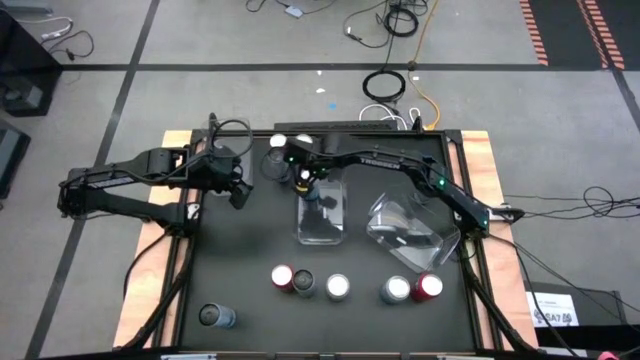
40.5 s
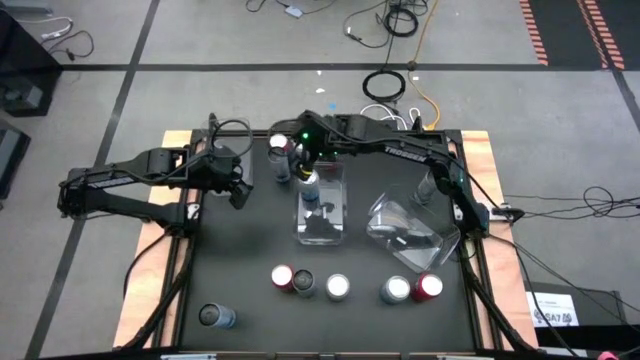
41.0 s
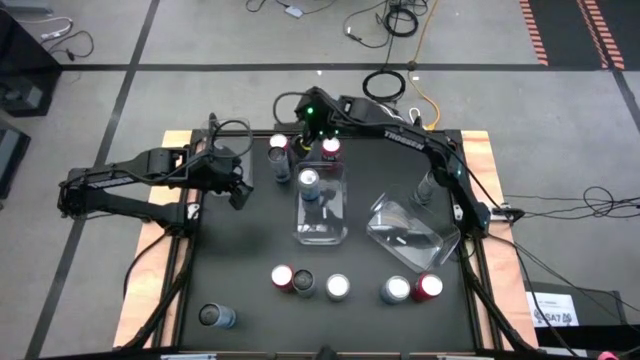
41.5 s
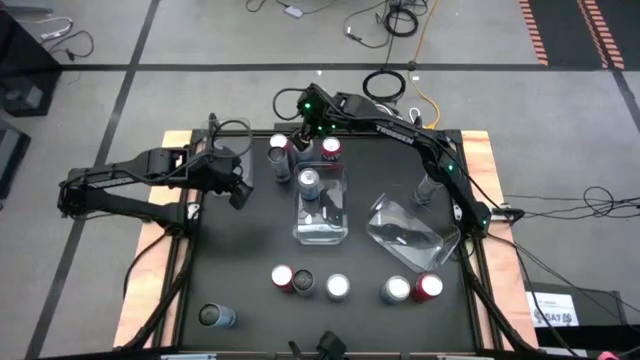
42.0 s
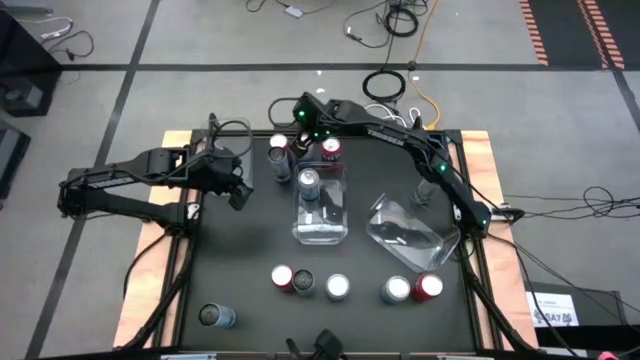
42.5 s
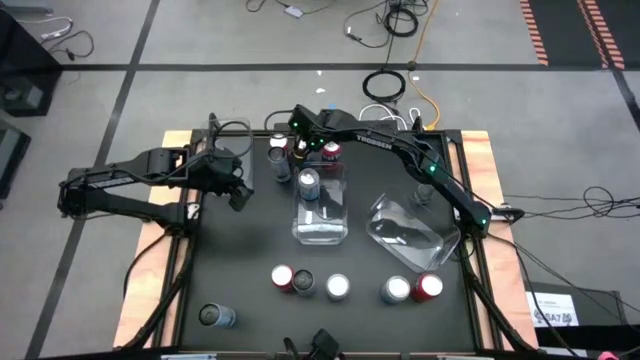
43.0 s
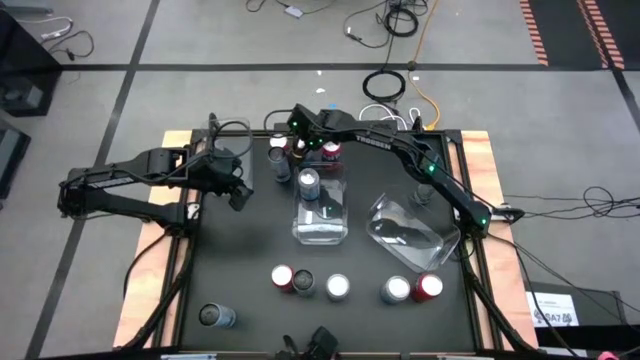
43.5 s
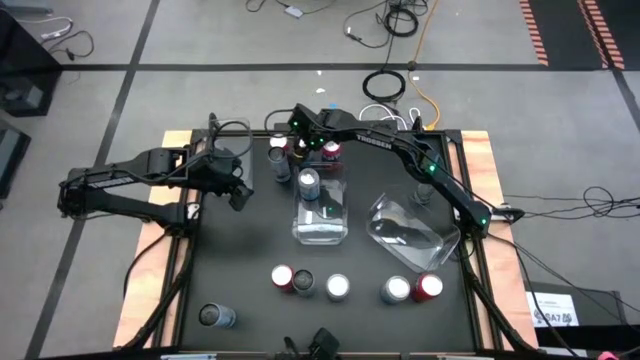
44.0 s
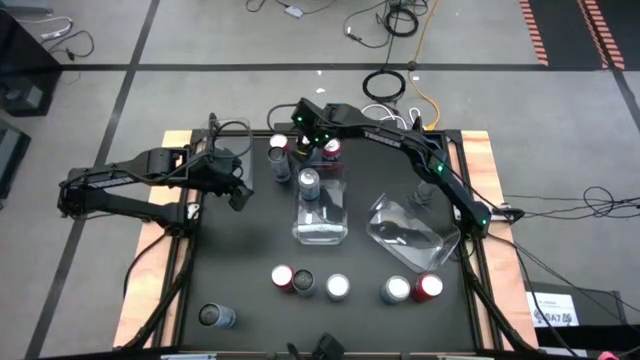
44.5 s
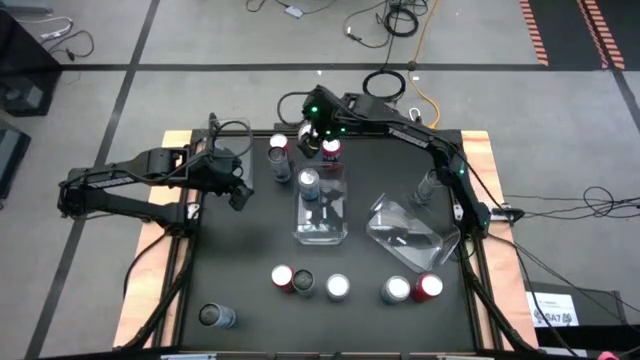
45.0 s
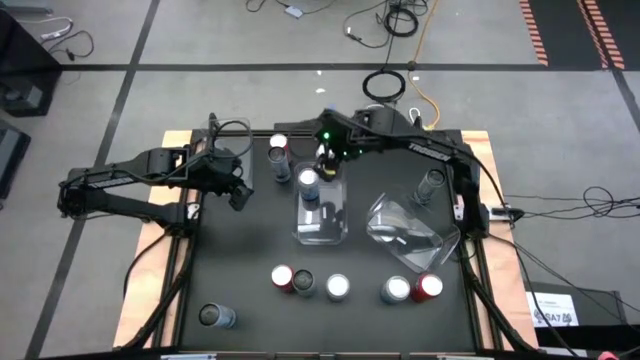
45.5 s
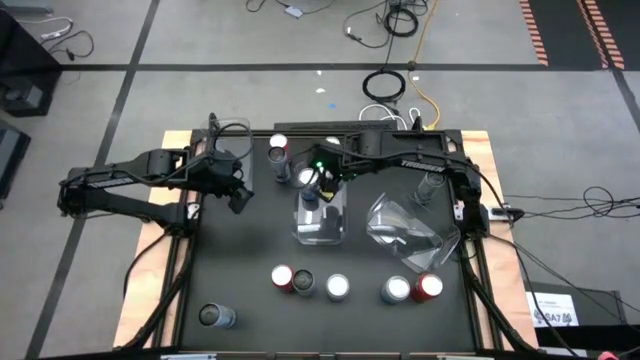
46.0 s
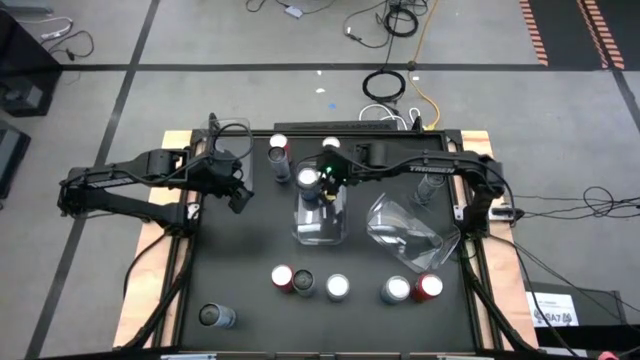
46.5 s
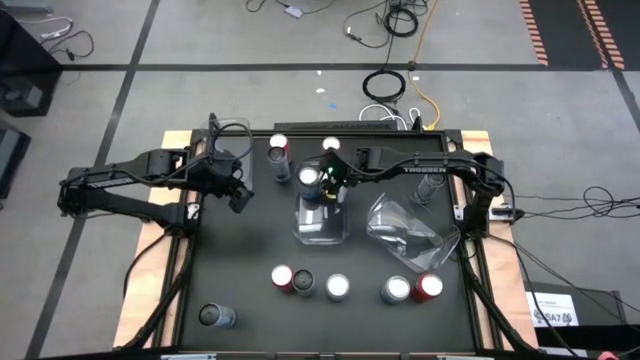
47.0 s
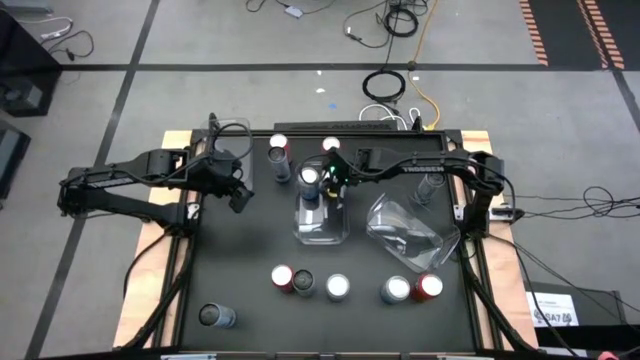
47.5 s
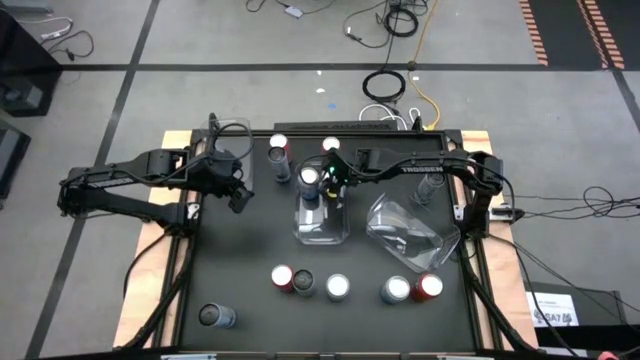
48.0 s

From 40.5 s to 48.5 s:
Task: Sort soda cans
Put the top blue-white soda can into the center transparent bin

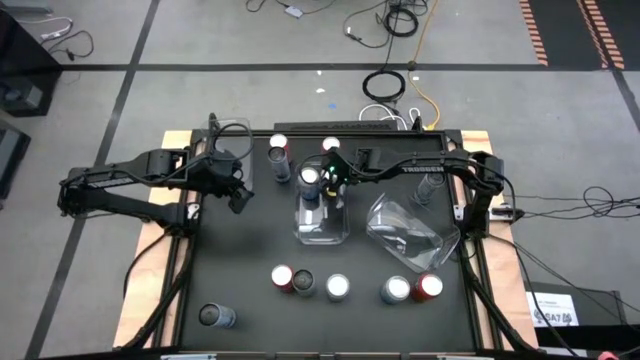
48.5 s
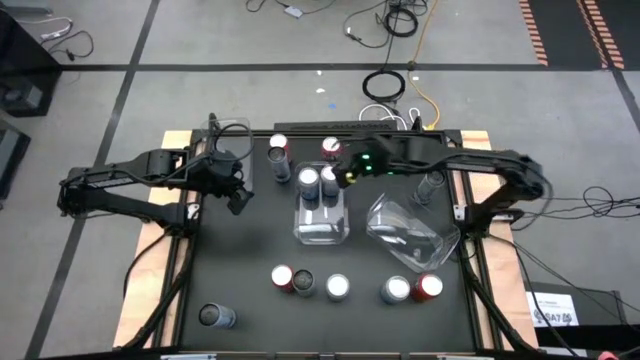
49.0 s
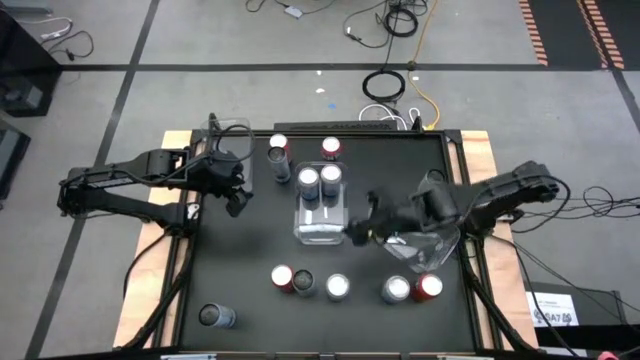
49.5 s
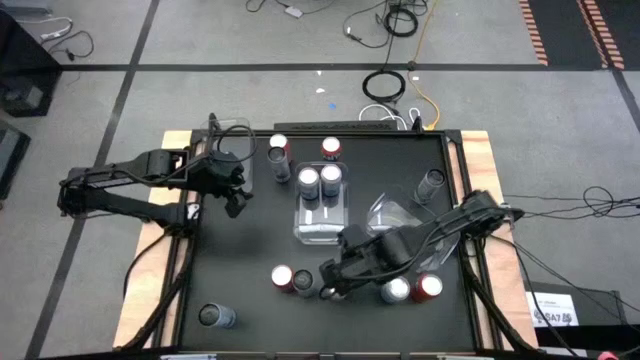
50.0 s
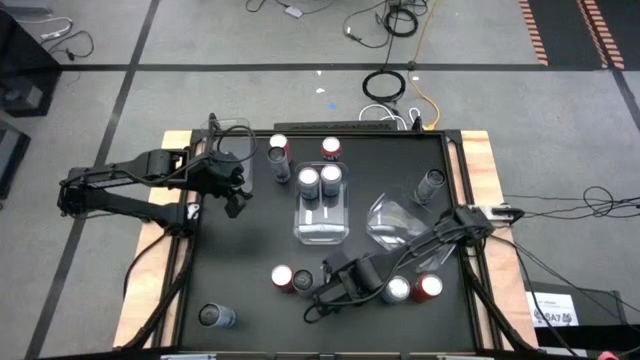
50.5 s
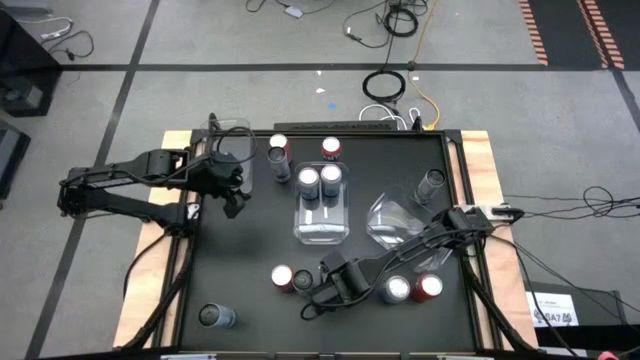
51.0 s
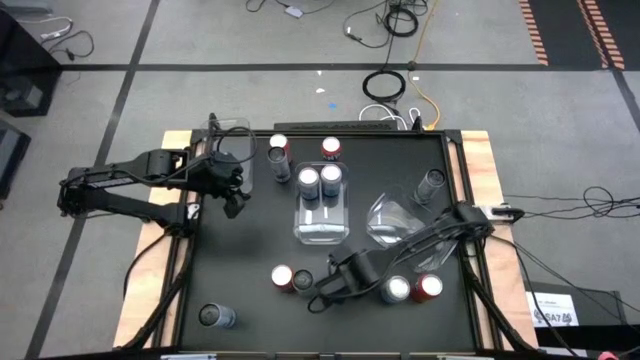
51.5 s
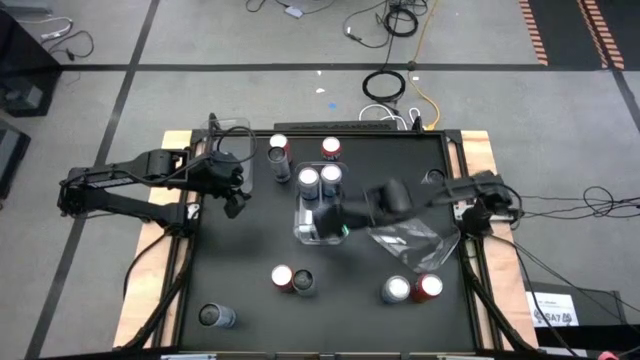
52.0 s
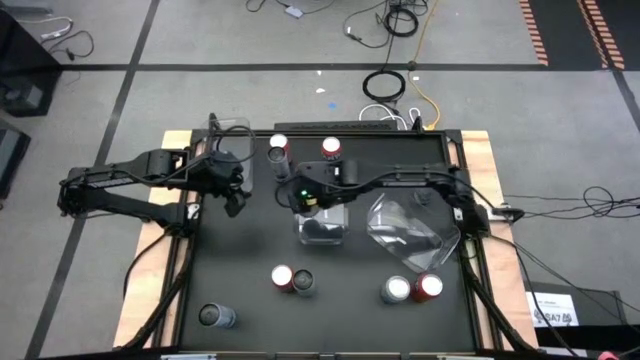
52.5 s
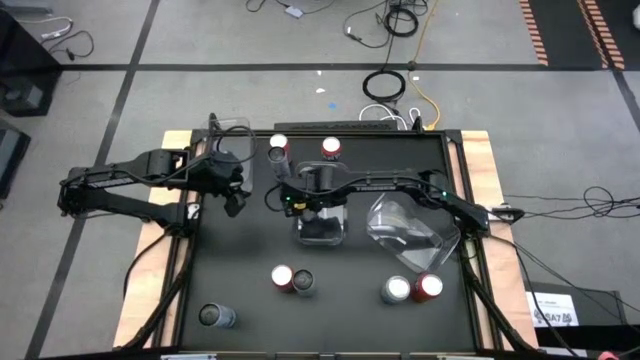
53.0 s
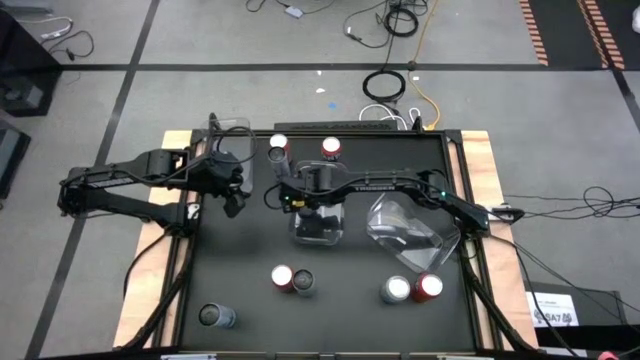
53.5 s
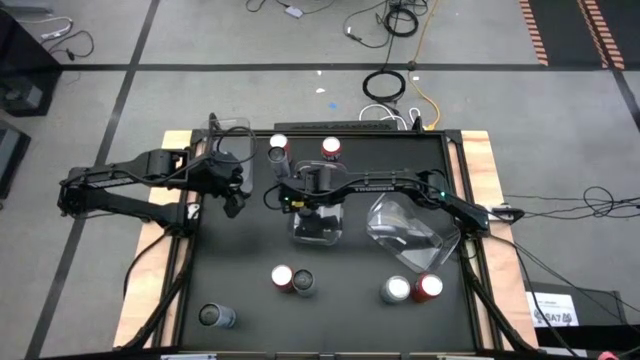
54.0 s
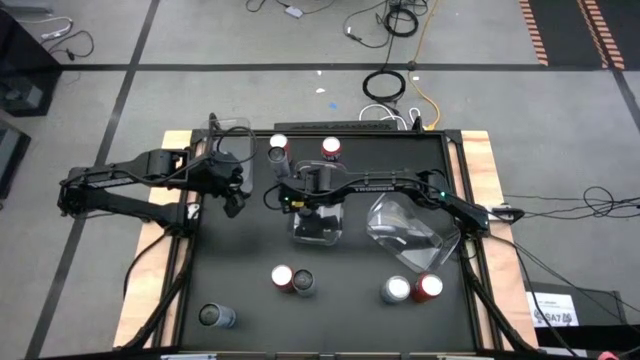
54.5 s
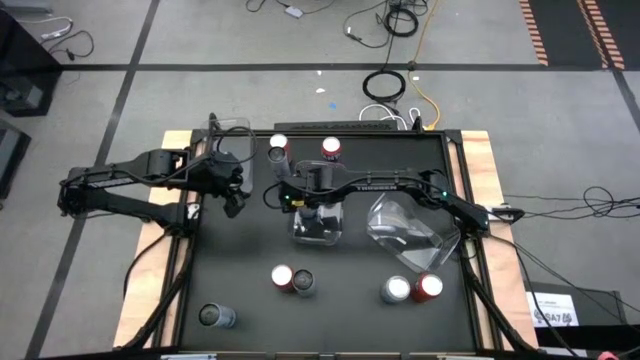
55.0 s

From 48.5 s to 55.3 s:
Put the left blue-white soda can into the center transparent bin

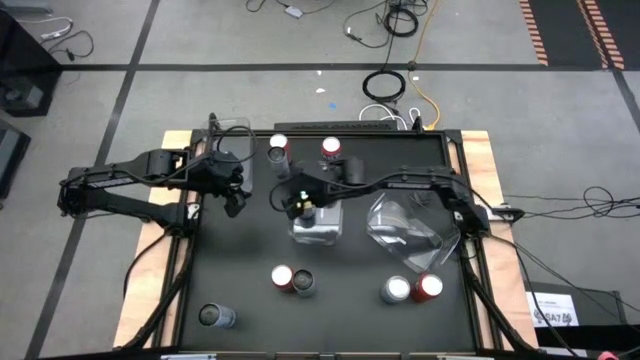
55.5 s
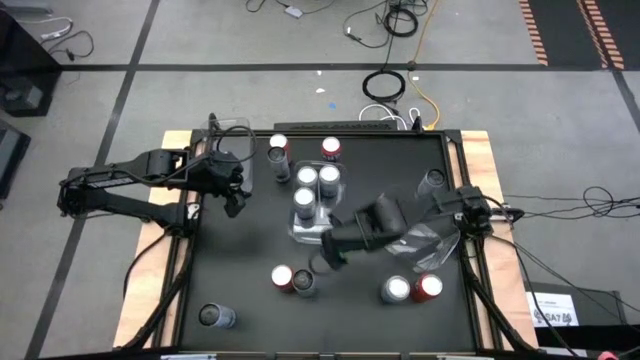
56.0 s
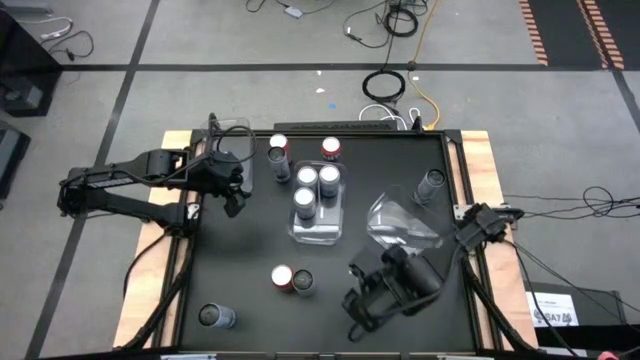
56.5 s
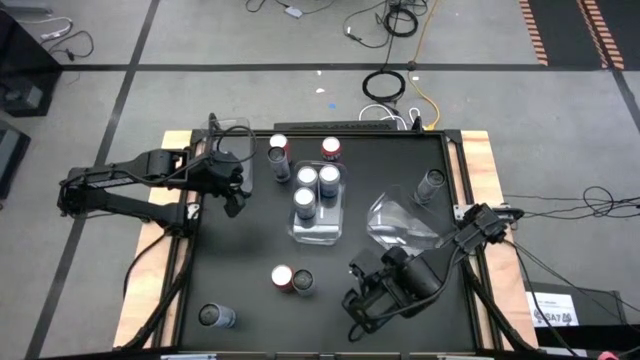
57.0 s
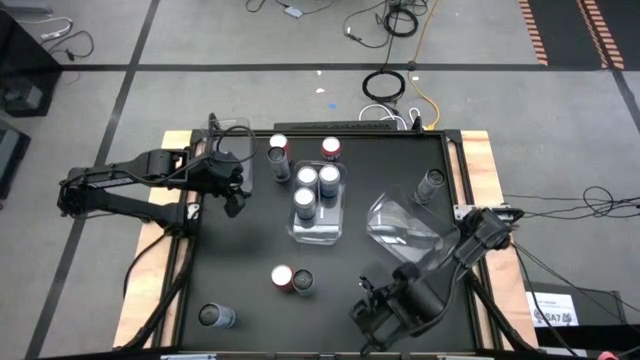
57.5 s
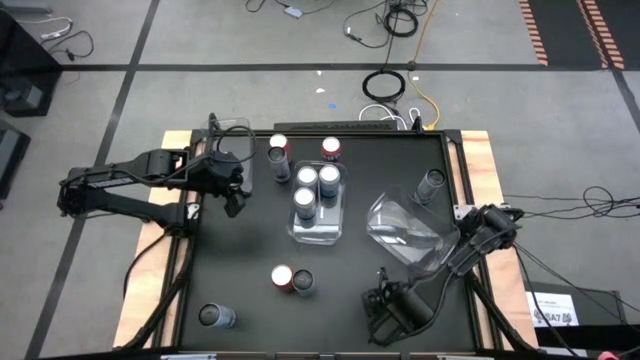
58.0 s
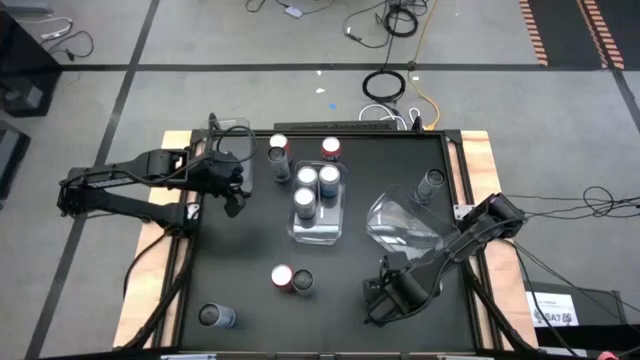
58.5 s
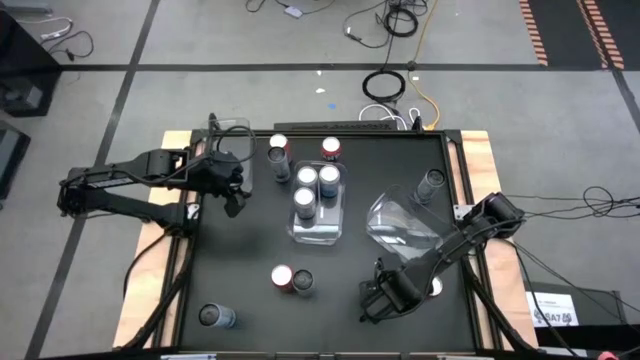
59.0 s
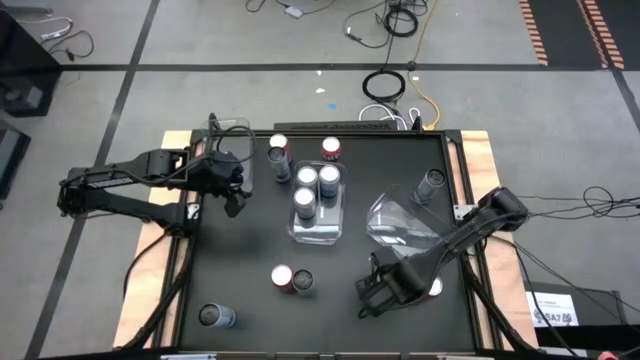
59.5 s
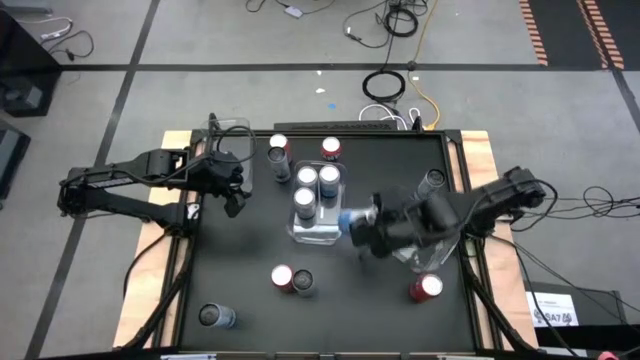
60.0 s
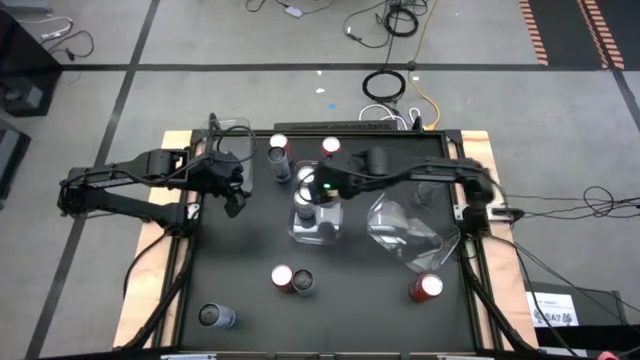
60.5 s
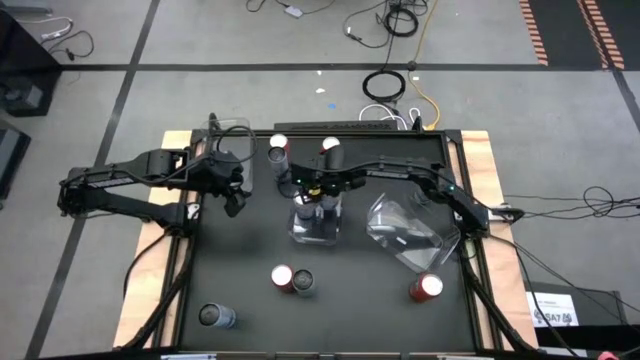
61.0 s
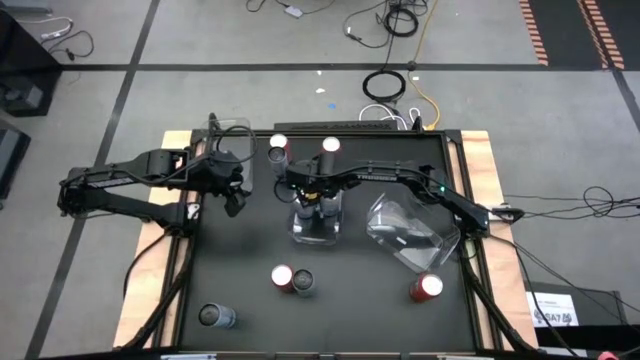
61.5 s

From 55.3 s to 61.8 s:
Put the blue-white soda can into the center transparent bin
